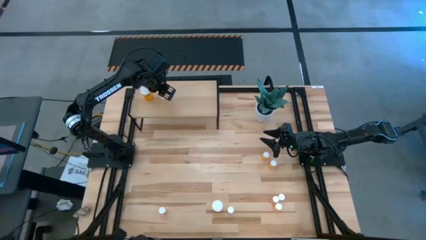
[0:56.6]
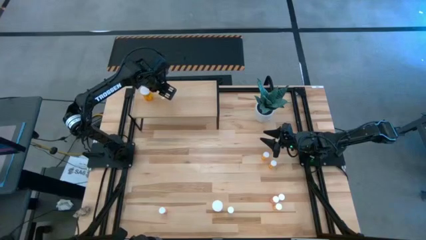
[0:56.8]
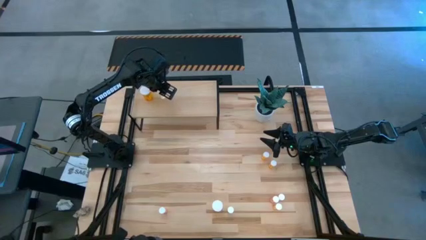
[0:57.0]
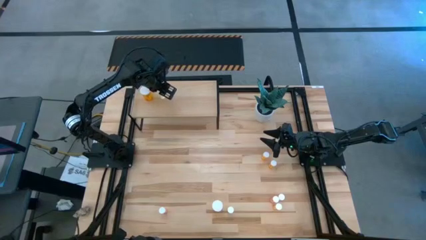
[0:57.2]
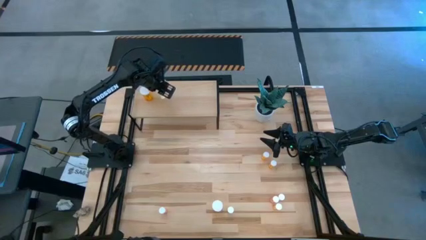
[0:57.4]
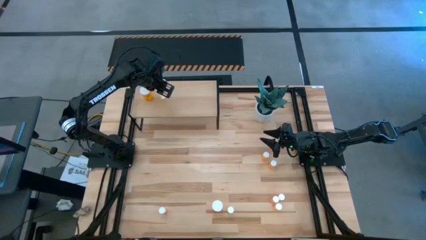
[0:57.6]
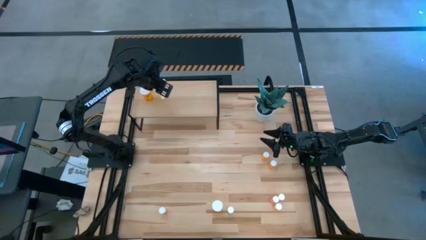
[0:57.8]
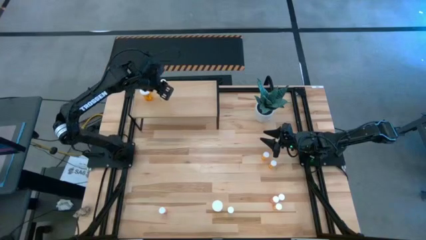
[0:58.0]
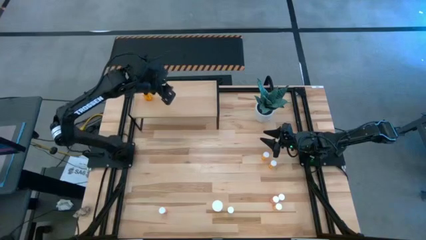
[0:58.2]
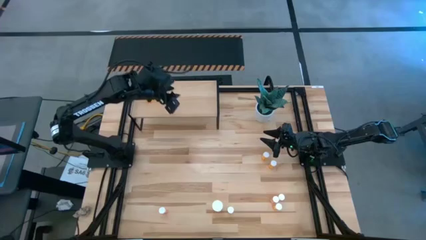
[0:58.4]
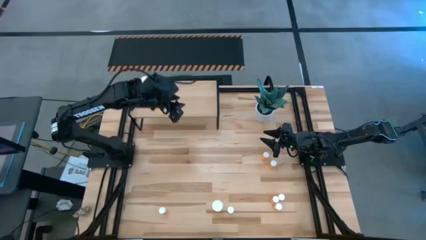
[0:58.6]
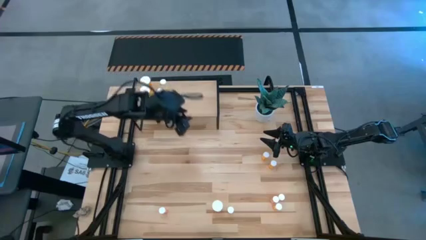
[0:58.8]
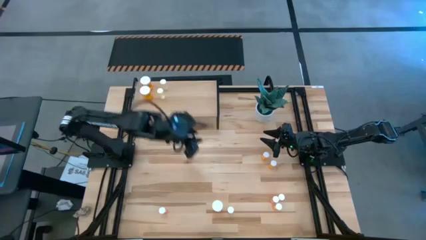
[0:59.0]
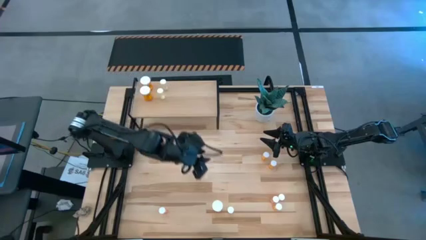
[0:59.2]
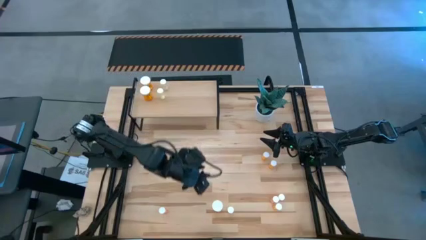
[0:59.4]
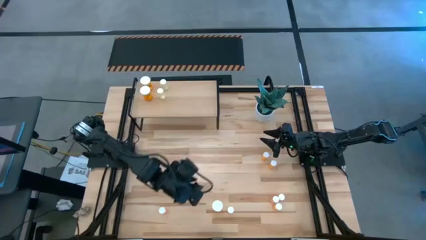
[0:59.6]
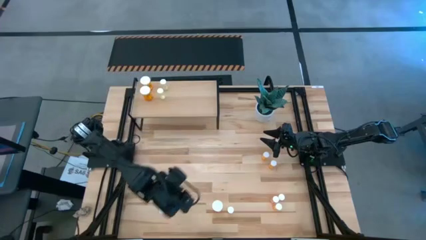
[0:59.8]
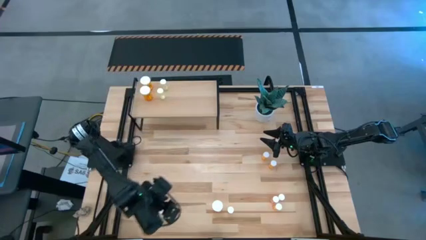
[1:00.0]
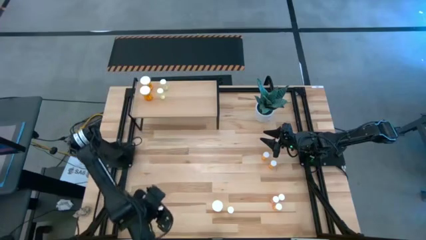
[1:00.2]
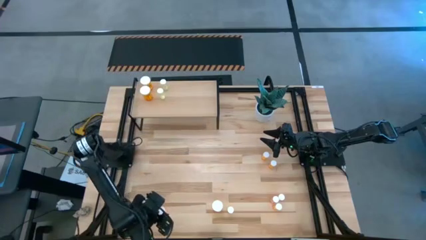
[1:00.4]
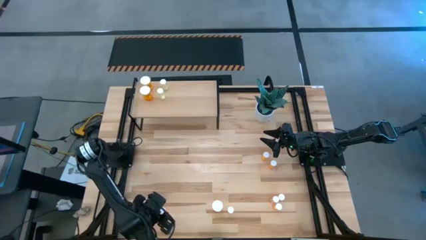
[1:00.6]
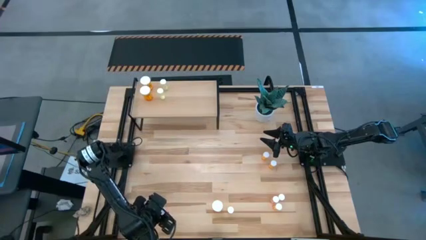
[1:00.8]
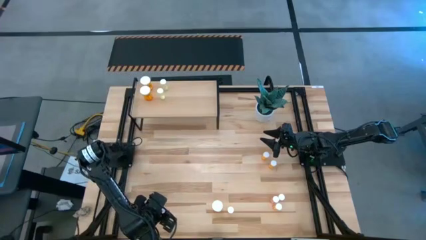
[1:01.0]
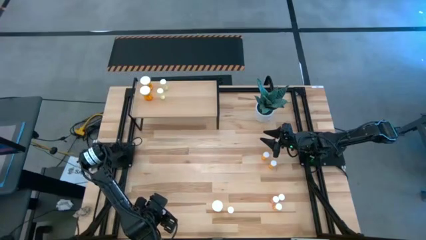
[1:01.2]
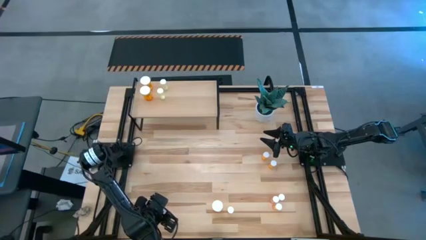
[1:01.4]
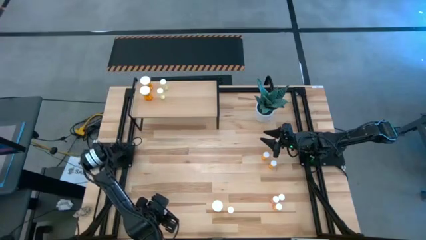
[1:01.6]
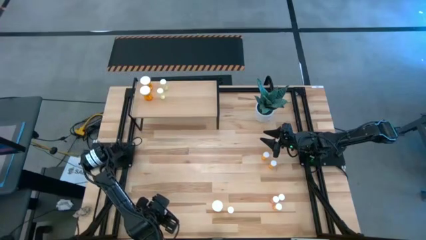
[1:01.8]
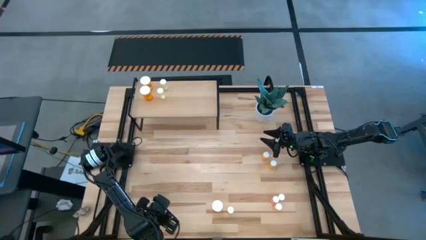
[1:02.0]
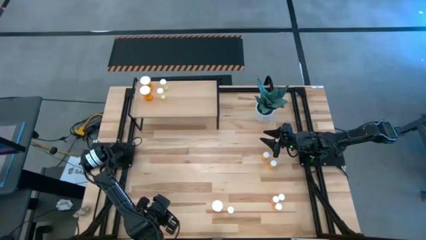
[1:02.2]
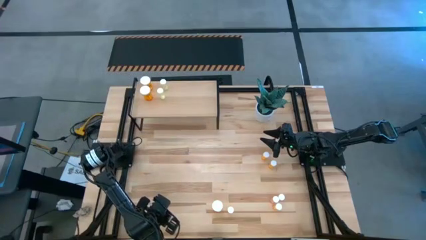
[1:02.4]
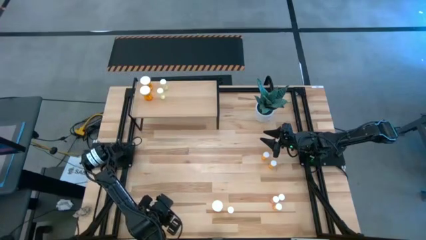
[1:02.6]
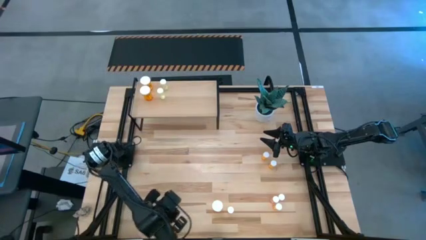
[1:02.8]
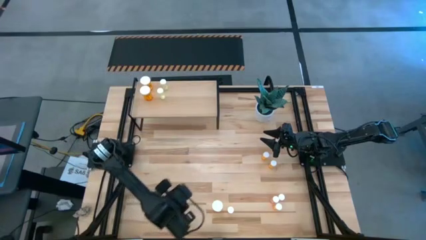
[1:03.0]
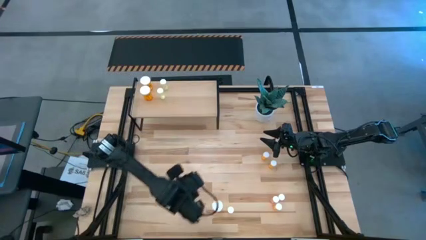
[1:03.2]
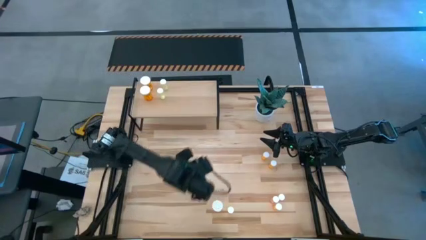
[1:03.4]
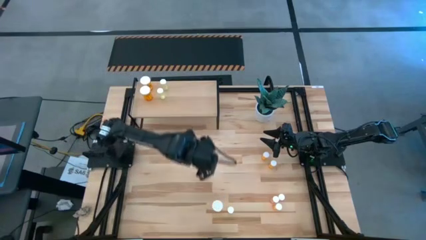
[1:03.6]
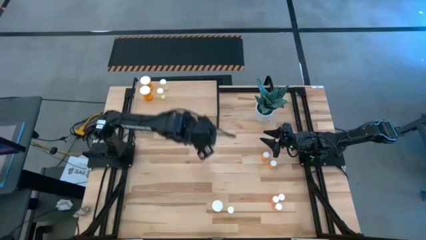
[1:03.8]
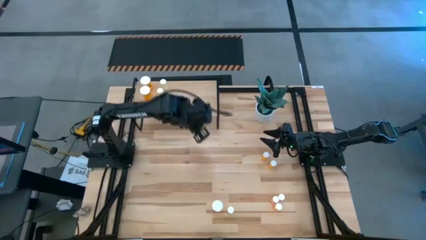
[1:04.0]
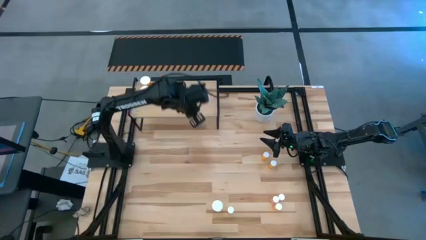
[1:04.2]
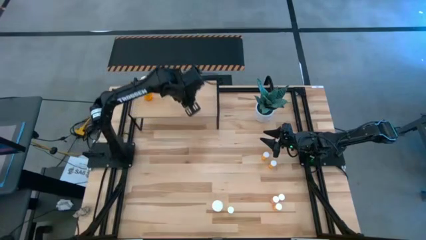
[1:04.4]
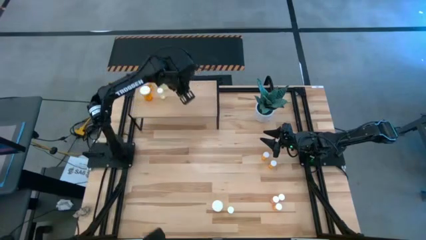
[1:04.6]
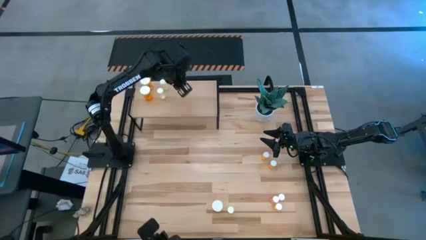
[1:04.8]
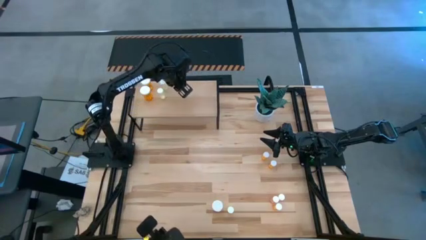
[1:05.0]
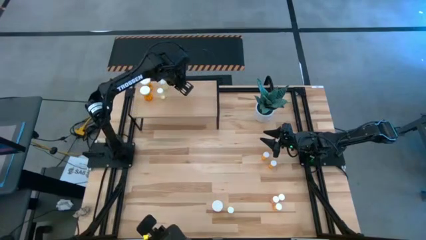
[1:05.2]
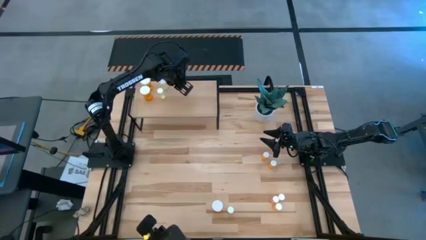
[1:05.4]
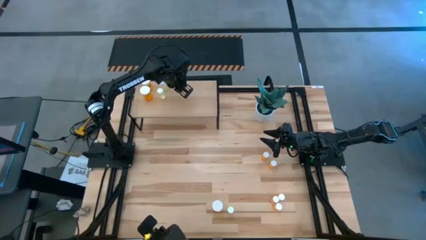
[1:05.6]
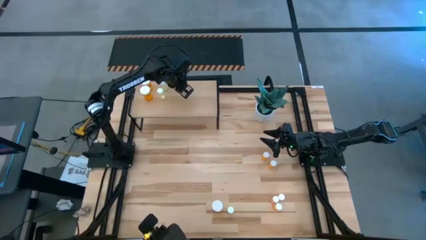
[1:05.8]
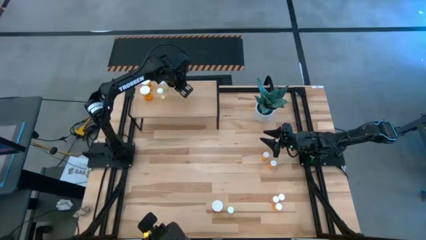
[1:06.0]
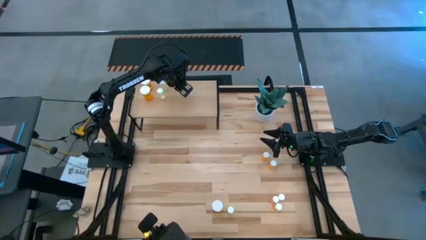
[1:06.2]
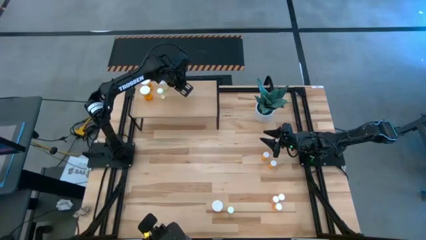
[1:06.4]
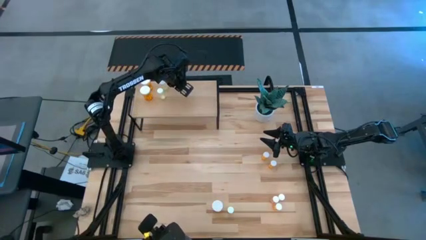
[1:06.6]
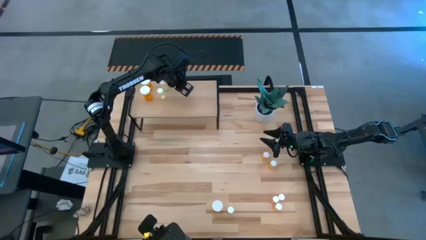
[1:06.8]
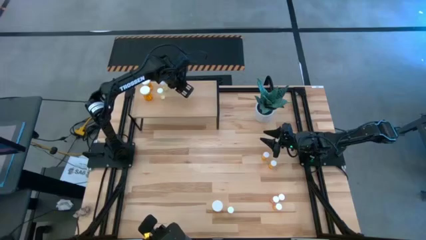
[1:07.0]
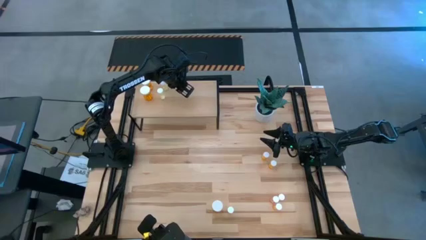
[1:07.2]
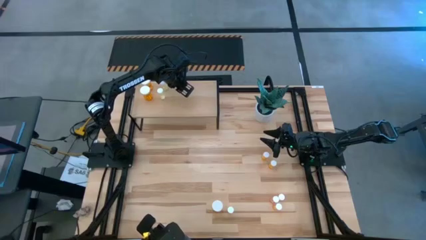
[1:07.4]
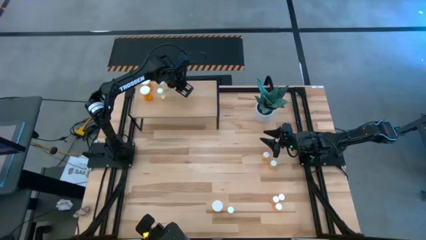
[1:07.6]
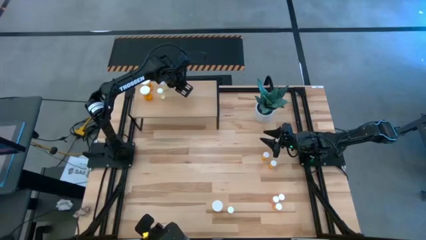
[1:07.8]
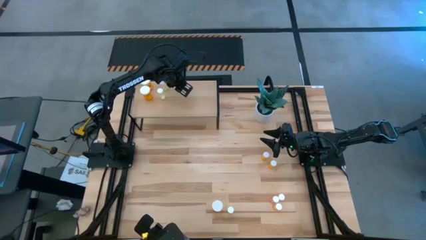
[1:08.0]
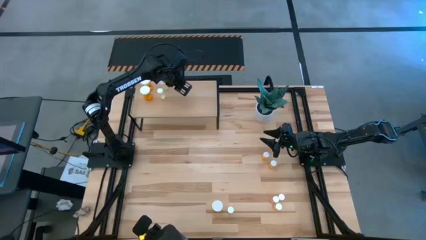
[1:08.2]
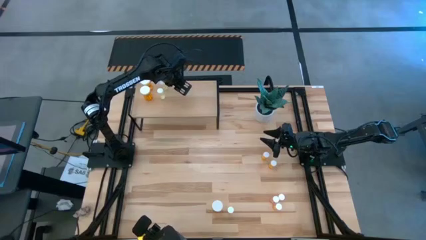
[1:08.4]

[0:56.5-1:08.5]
Task: Pick and place medicine bottles onto shelf by color
Put the left pink pill bottle on the shelf

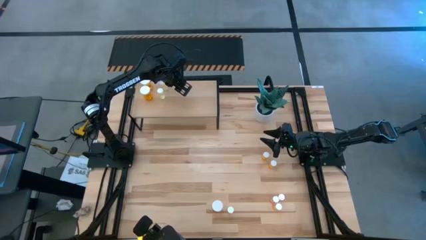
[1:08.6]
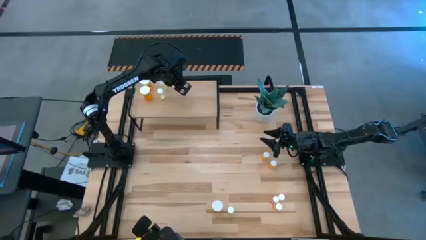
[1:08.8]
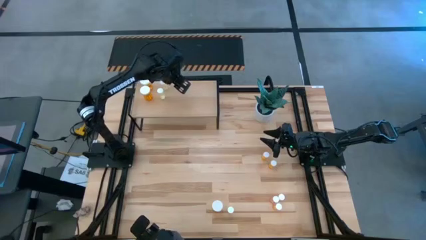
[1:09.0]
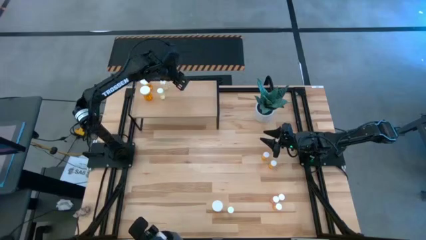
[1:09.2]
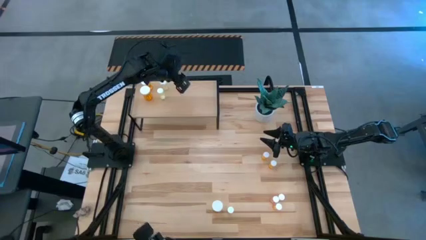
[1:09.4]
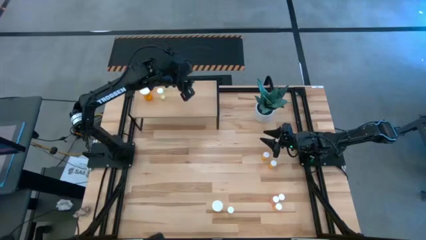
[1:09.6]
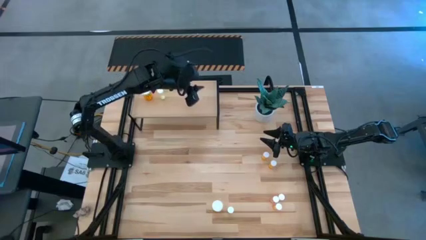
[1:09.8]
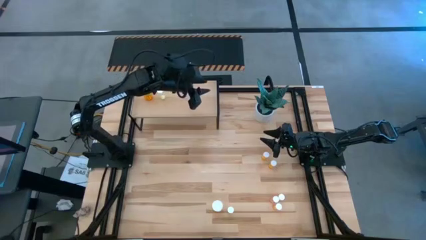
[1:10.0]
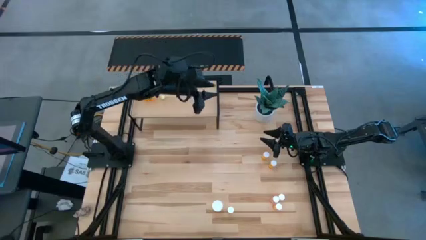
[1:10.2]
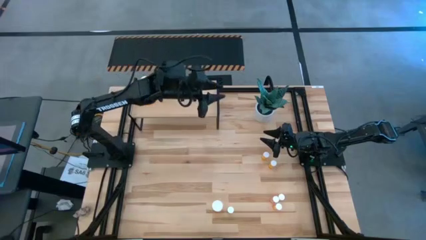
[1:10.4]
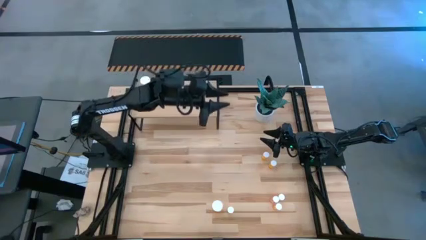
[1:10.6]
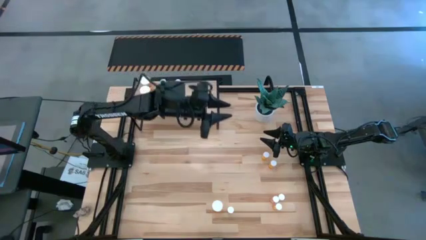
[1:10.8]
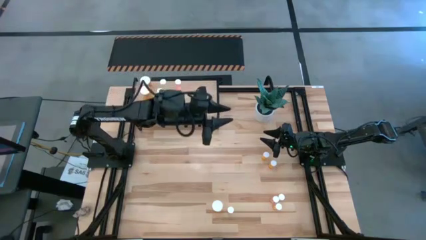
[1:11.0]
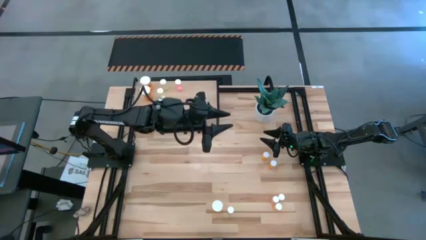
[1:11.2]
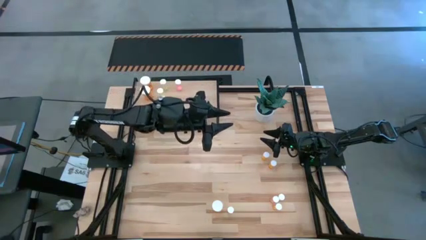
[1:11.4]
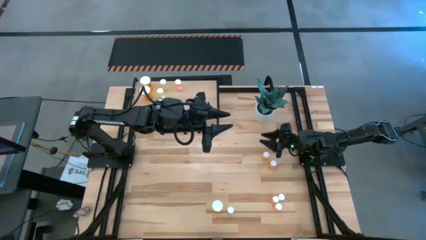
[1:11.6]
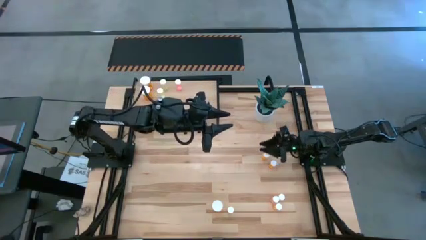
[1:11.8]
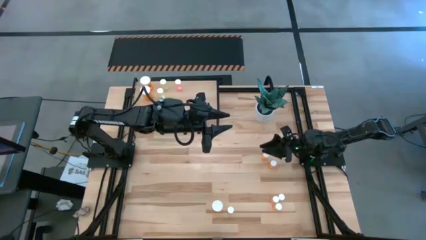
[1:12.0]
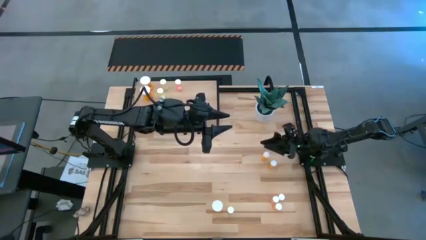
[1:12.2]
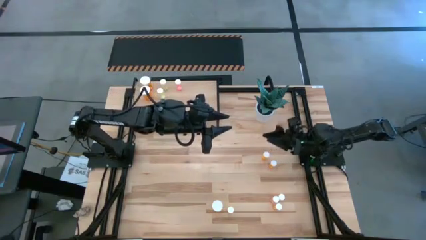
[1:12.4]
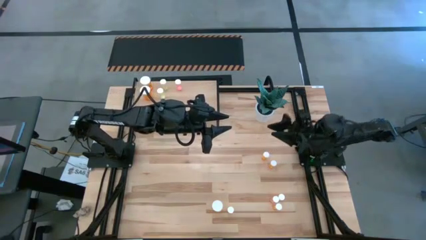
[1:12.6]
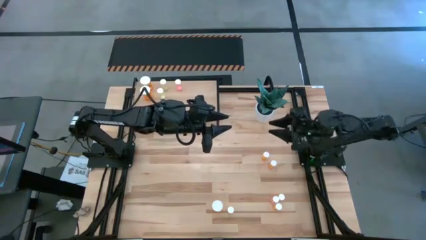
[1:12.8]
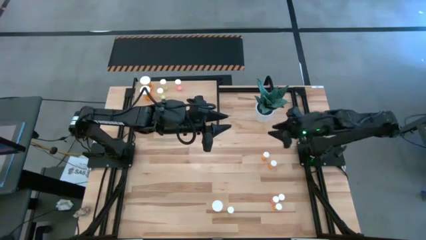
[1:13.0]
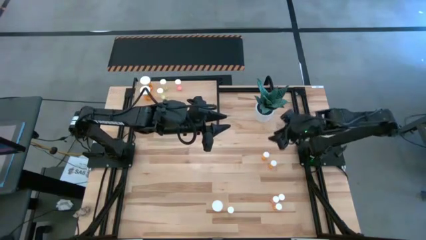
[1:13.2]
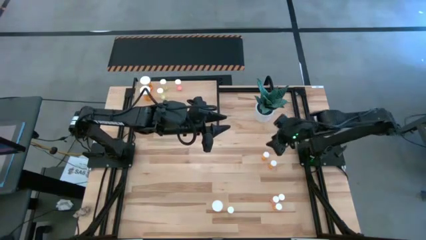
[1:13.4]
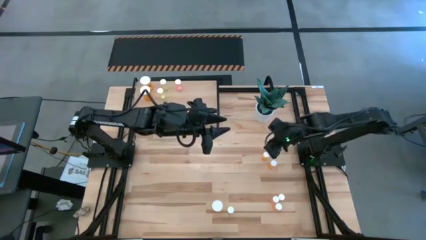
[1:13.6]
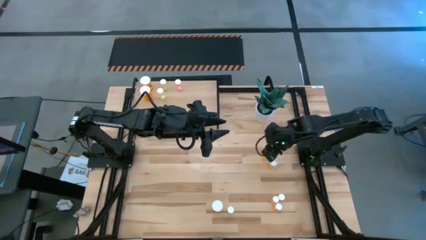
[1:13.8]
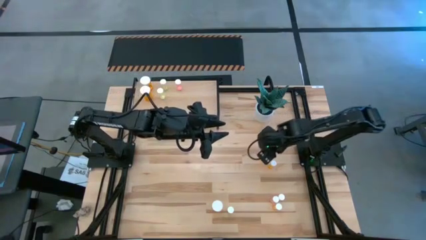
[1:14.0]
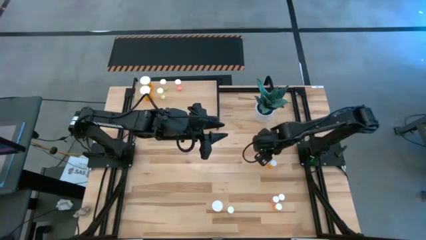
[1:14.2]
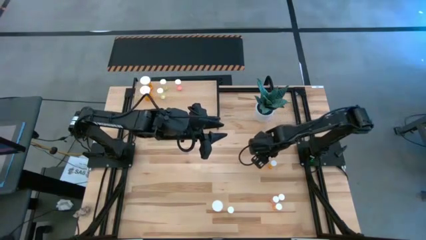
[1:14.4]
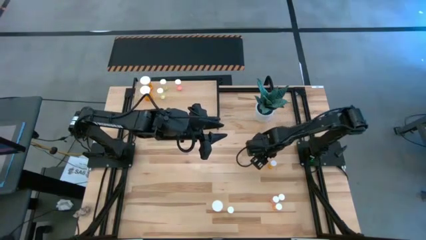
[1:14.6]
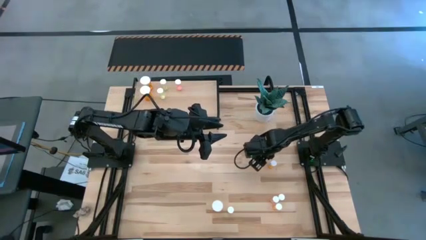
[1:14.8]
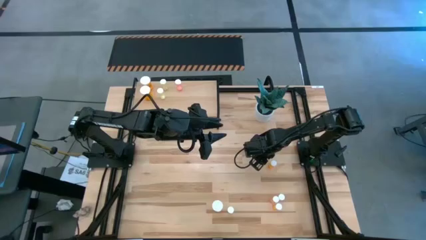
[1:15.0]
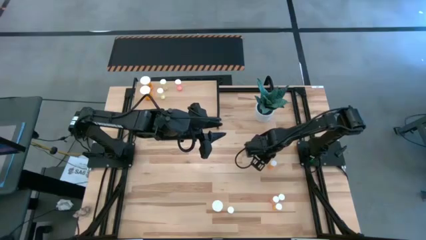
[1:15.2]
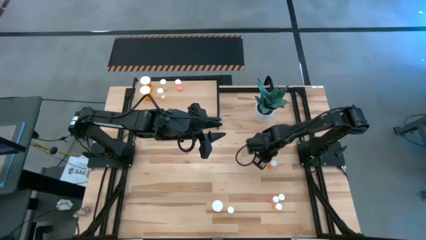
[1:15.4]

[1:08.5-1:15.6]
Put the top small orange pill bottle on the shelf
